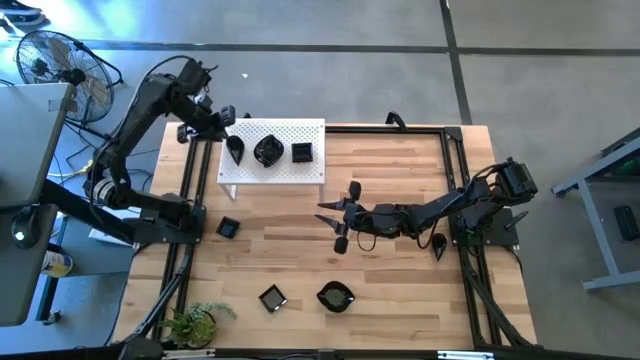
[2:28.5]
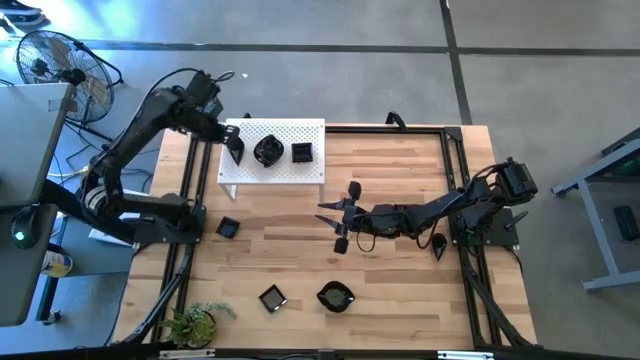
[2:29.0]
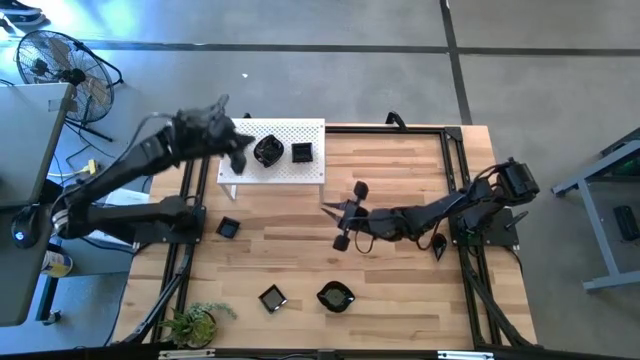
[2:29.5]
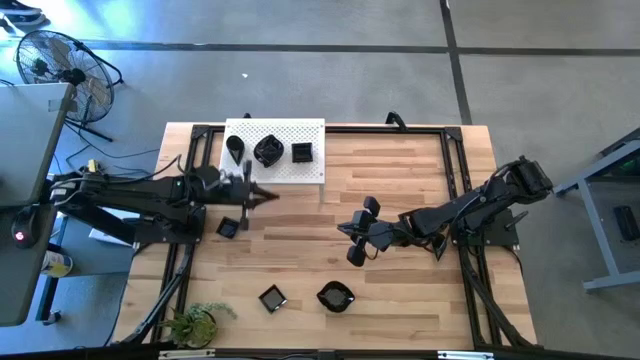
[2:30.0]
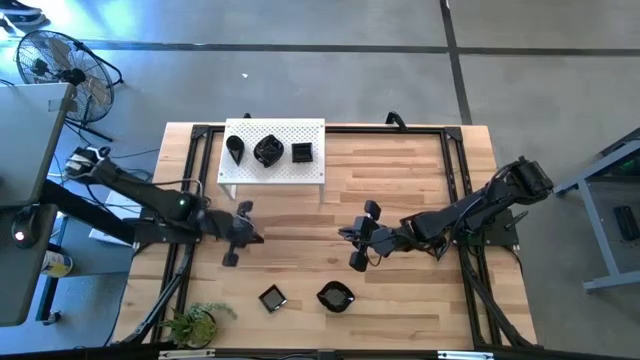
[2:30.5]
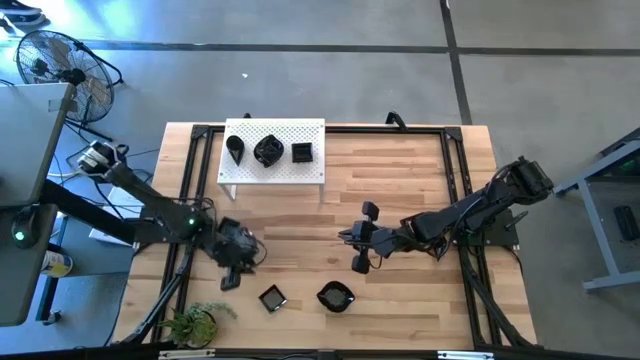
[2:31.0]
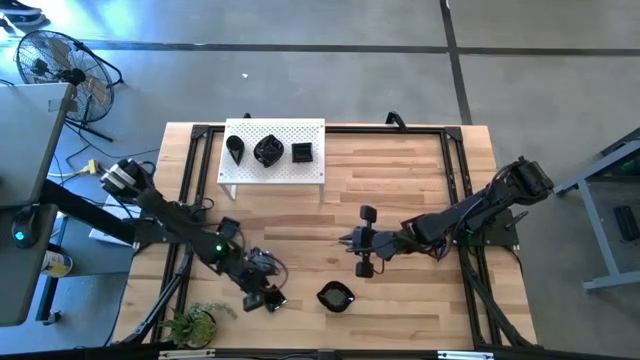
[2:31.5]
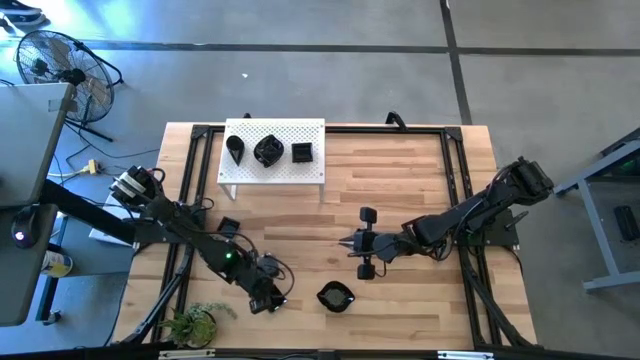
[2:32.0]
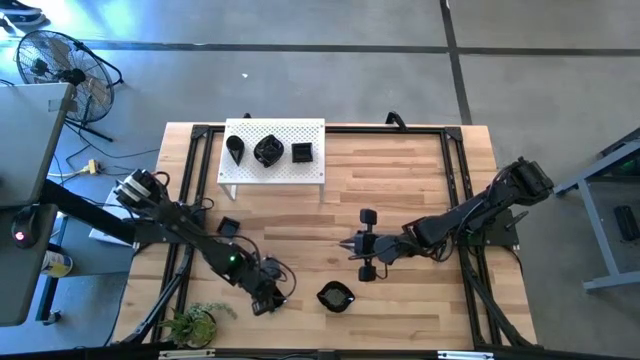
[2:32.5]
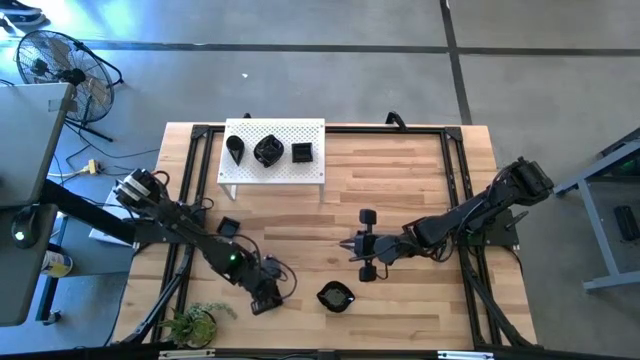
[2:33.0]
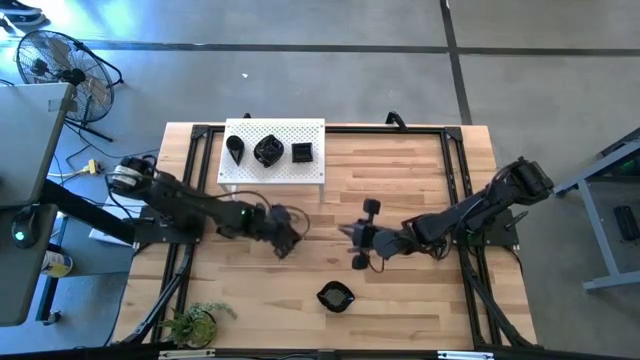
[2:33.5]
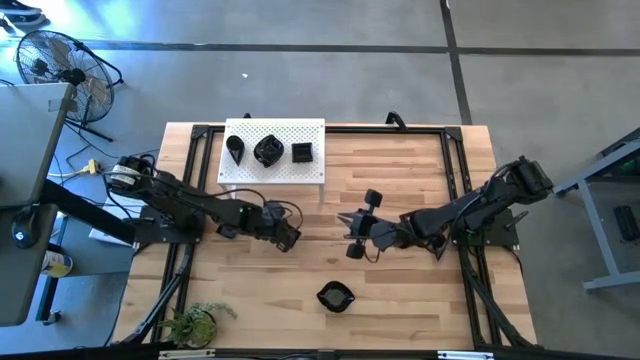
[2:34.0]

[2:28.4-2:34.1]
Task: Pick & Place Mini shaped plates
Stack the square plate on top of the square plate on the shelf

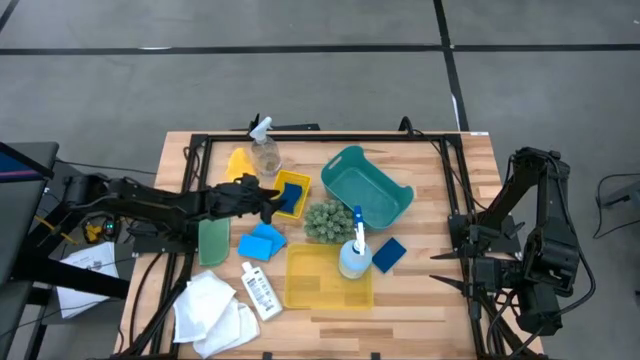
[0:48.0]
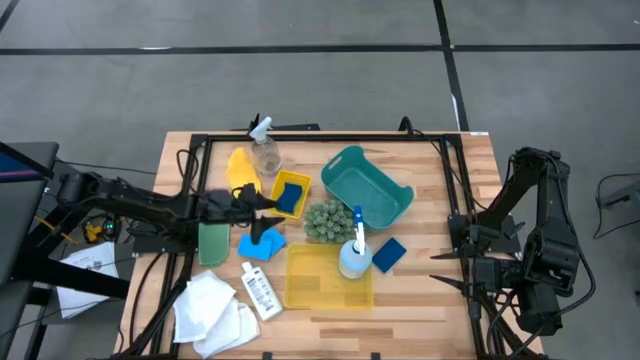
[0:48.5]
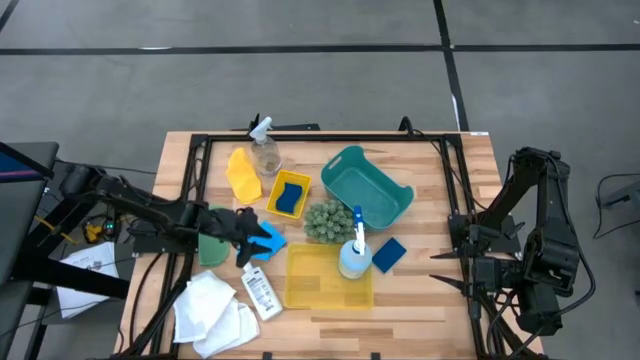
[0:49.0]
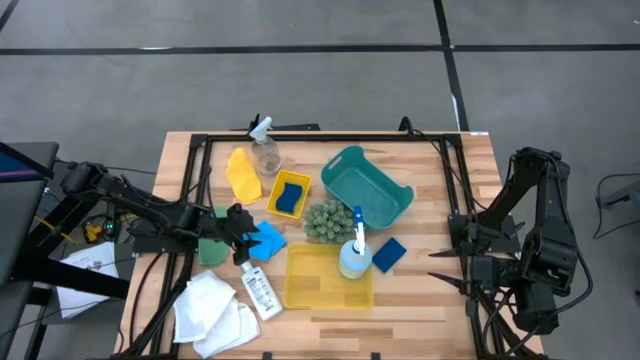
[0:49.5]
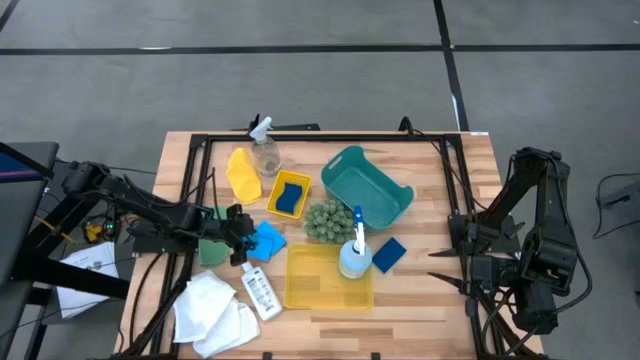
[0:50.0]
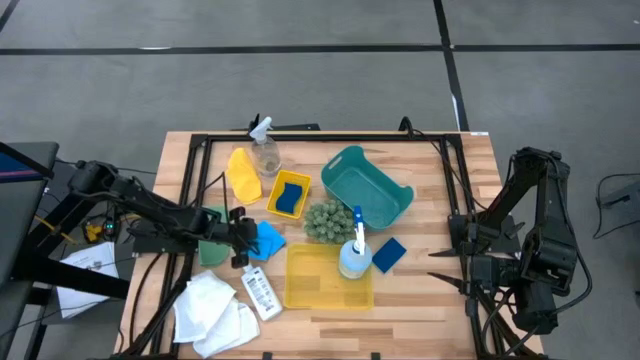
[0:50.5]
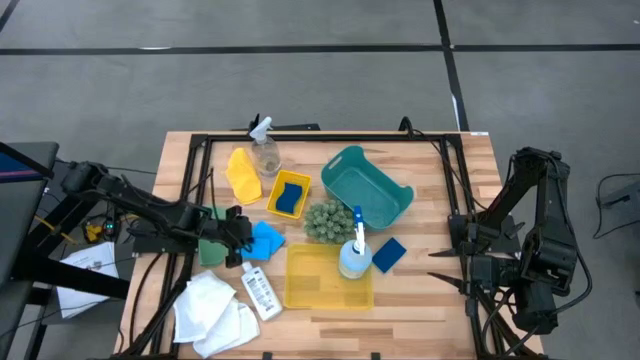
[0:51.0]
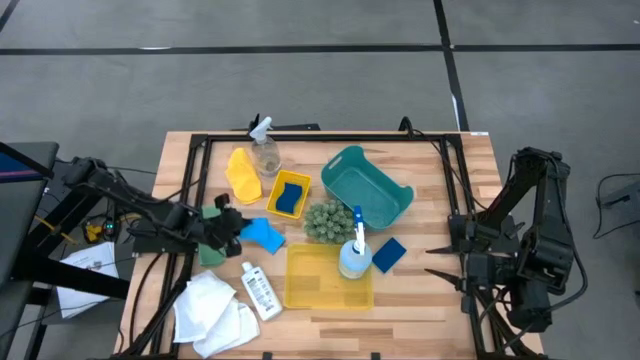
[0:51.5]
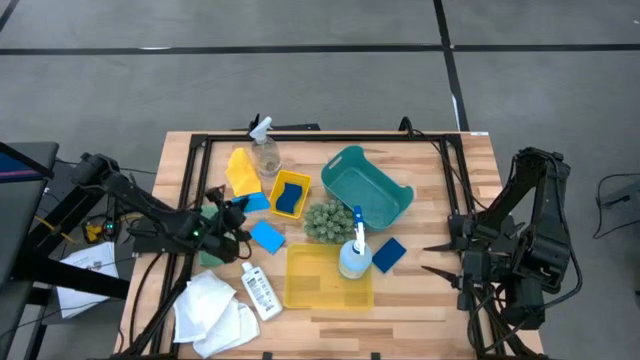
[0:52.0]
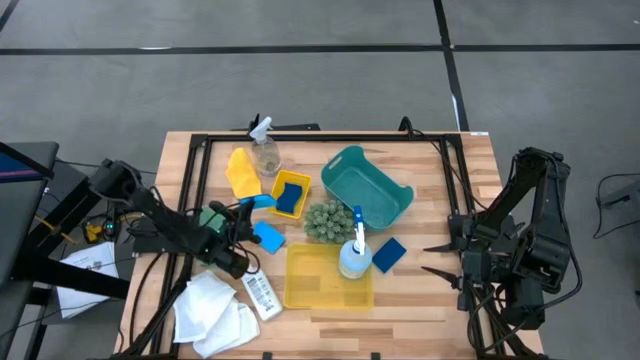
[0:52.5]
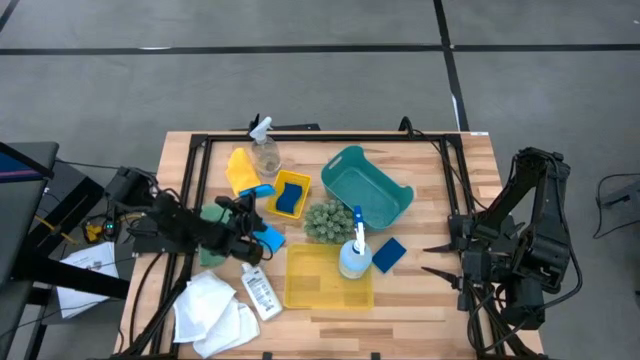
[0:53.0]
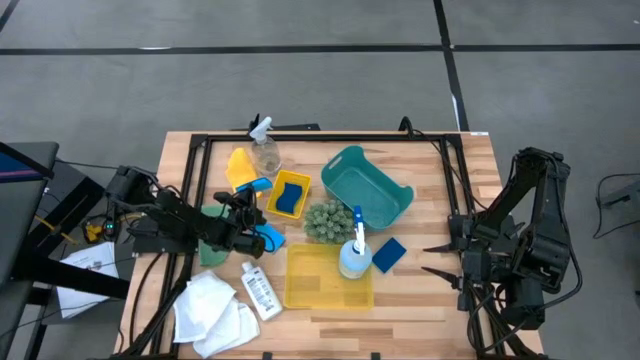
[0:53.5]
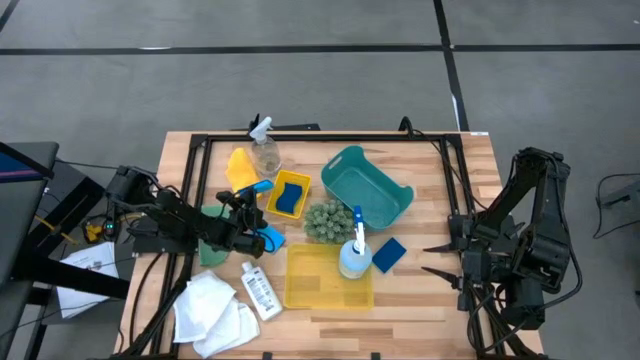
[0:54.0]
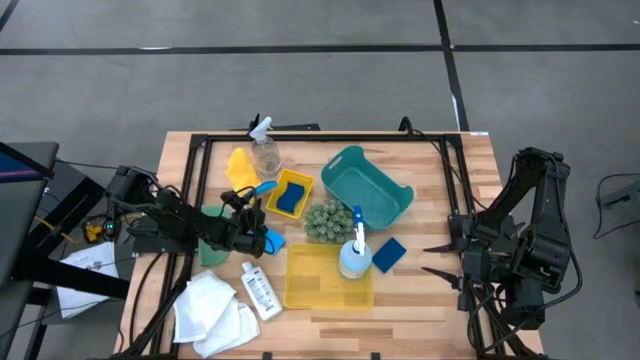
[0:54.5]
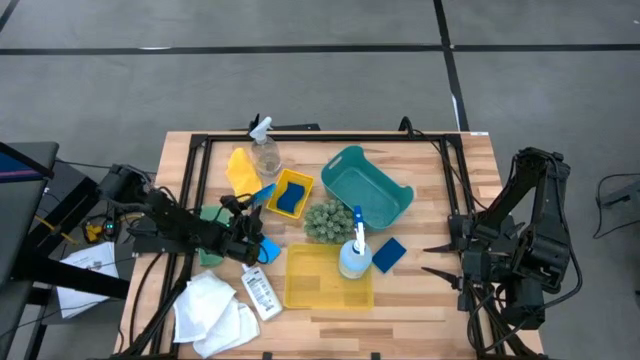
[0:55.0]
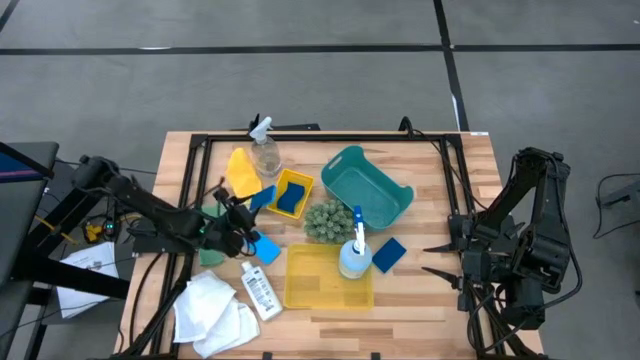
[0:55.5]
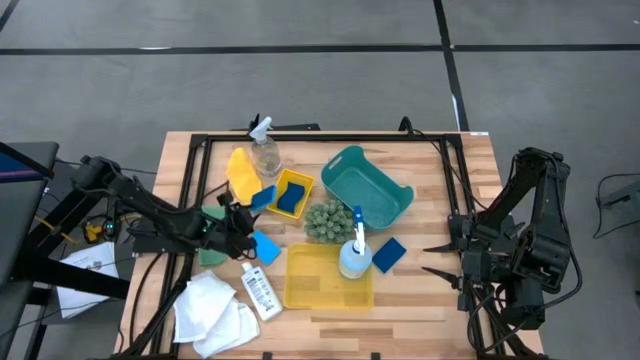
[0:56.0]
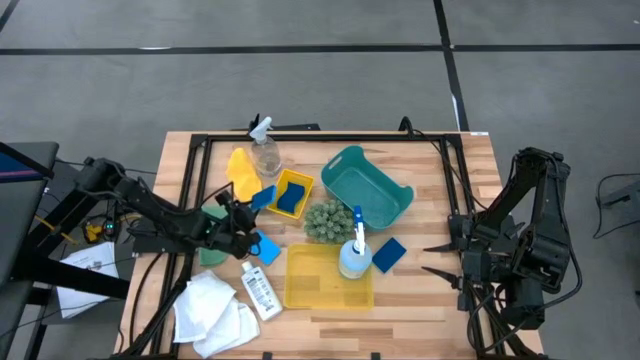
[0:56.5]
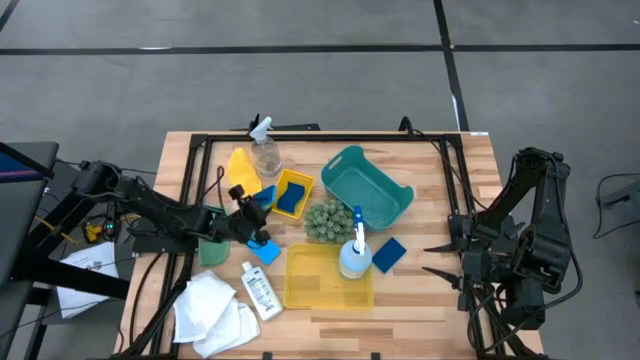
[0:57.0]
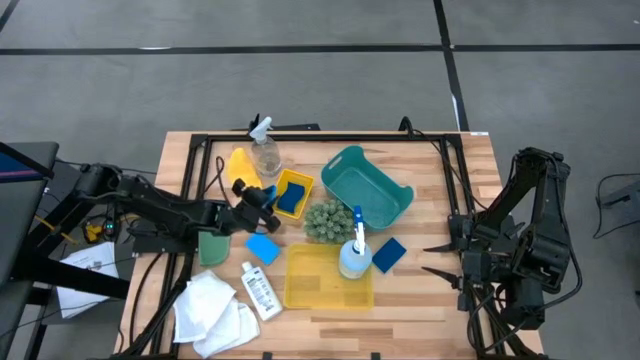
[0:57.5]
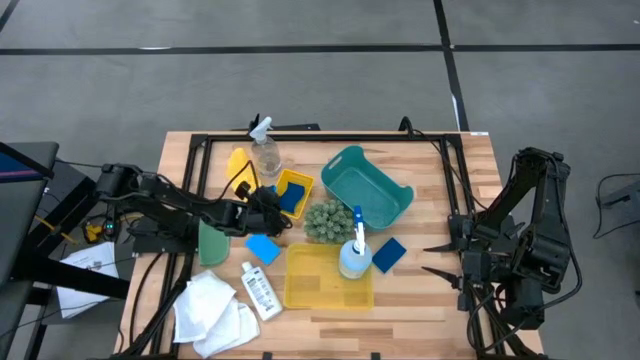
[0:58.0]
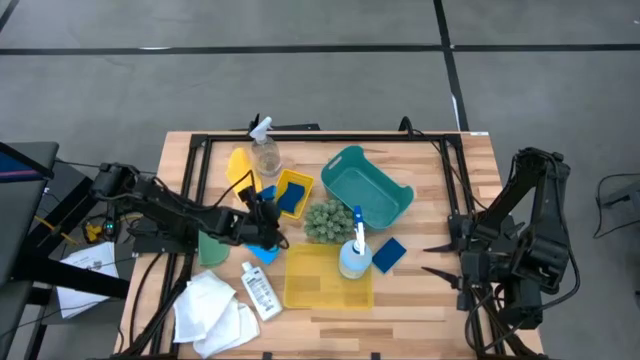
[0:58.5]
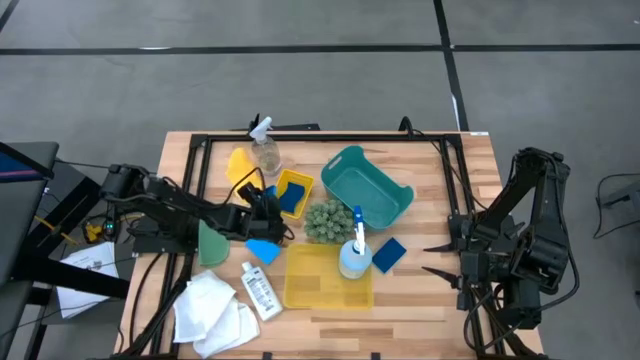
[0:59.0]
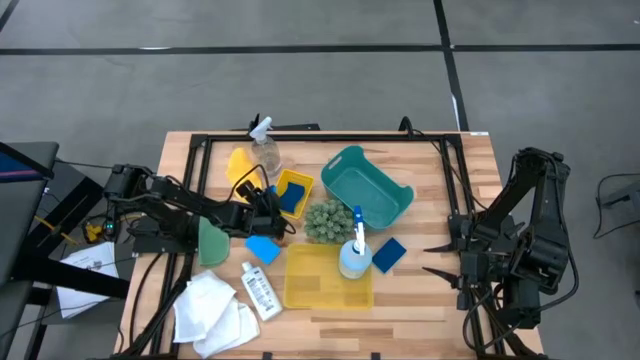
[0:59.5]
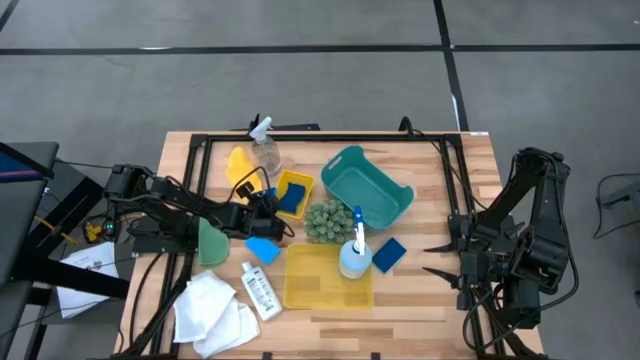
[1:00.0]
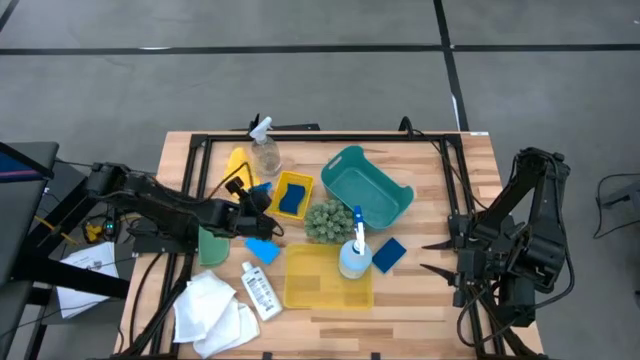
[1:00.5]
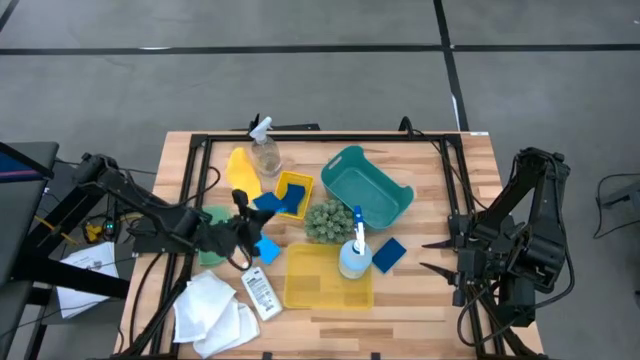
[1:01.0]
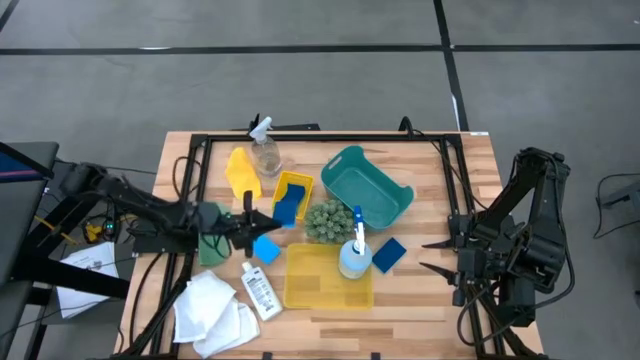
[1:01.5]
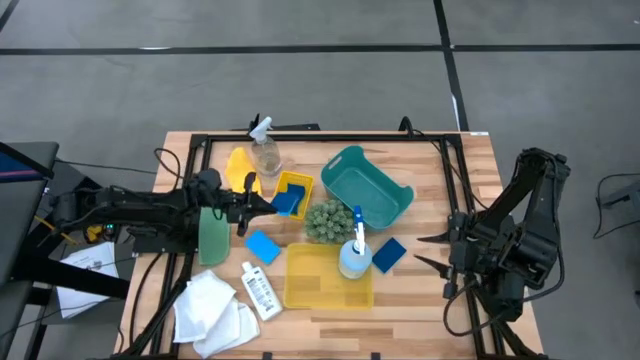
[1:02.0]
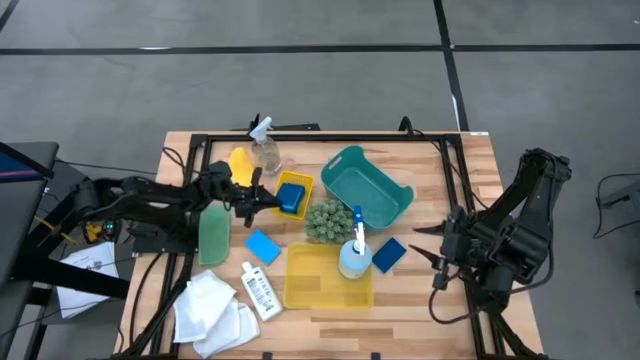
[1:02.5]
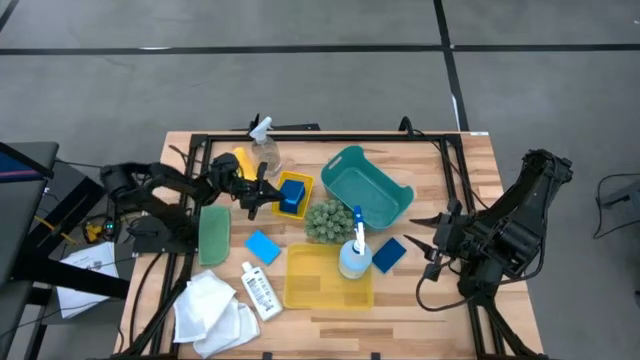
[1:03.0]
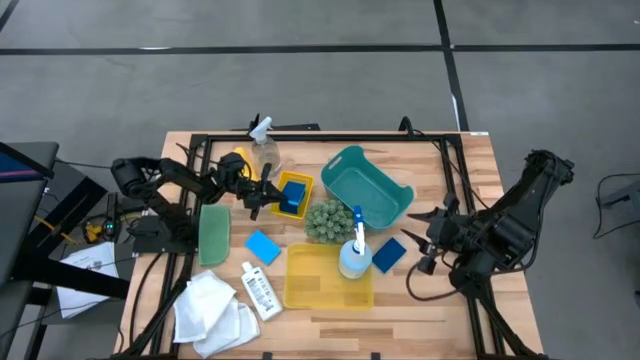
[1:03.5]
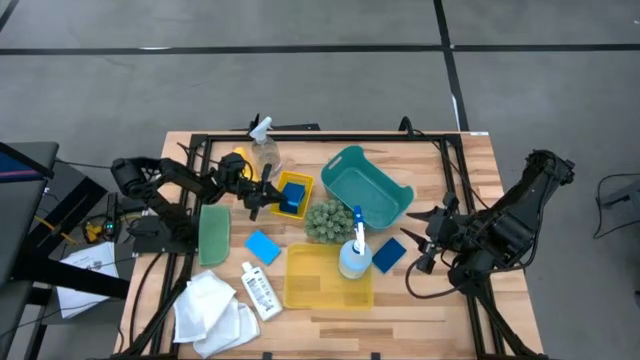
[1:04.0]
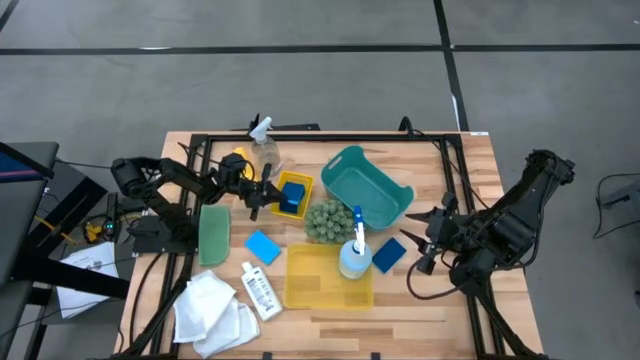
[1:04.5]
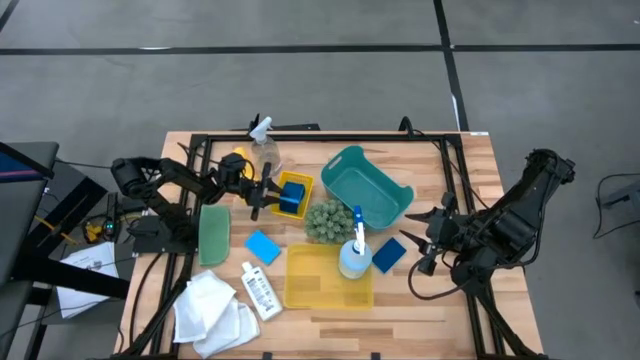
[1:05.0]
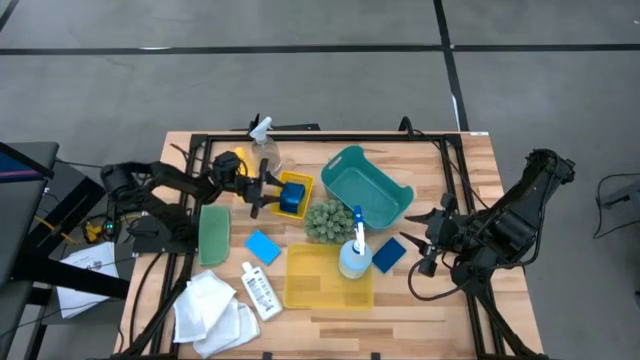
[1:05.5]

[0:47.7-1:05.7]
Task: Pick & Place Kitchen Items
Put the blue sponge into the top yellow bin
